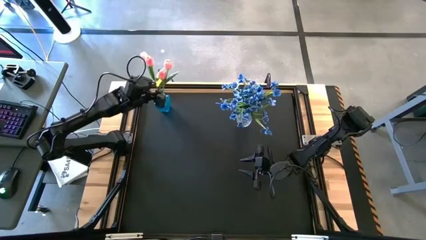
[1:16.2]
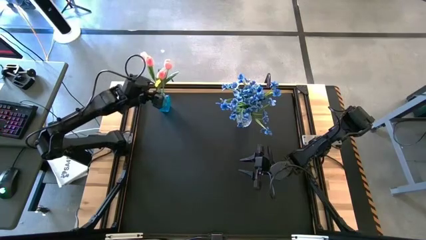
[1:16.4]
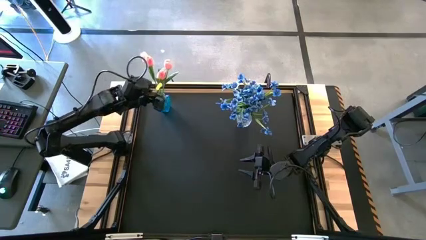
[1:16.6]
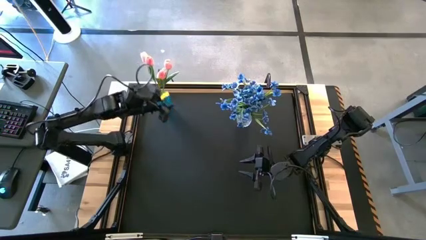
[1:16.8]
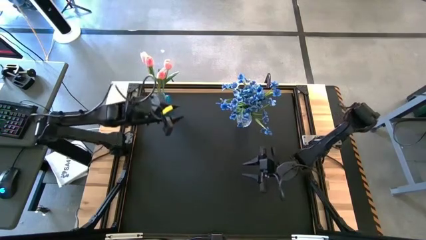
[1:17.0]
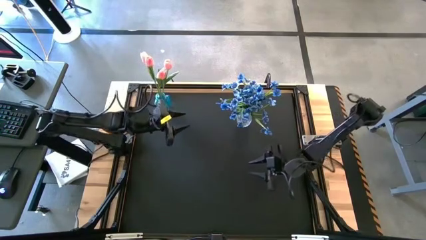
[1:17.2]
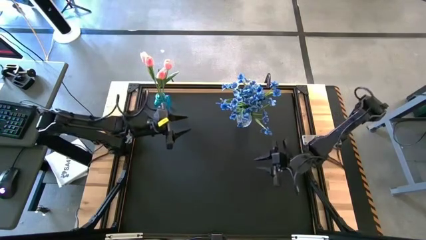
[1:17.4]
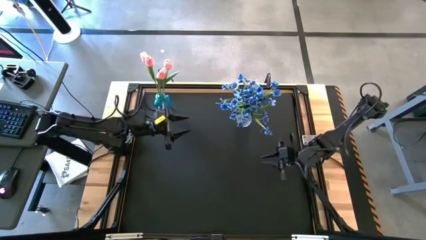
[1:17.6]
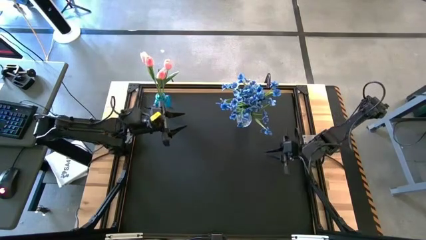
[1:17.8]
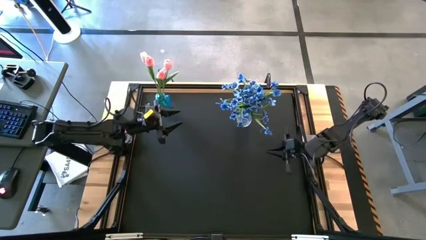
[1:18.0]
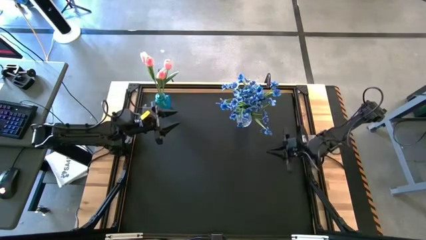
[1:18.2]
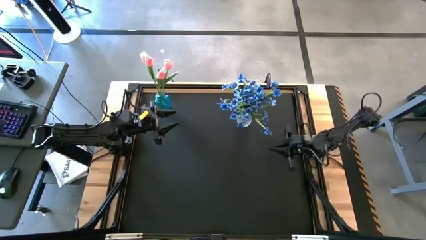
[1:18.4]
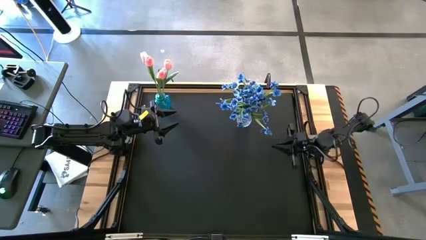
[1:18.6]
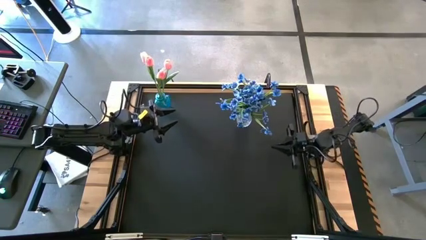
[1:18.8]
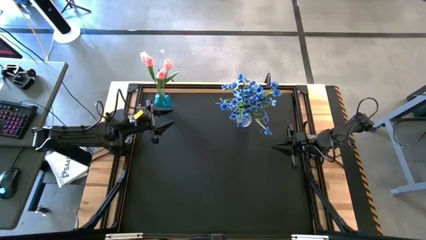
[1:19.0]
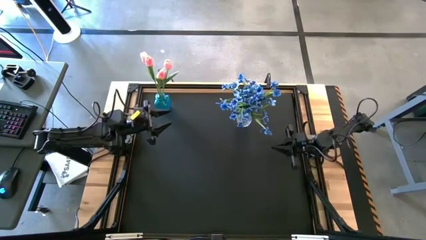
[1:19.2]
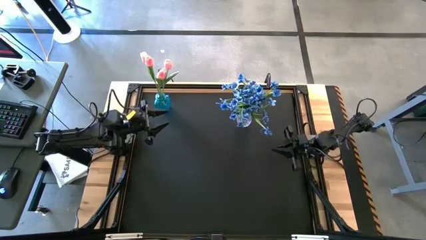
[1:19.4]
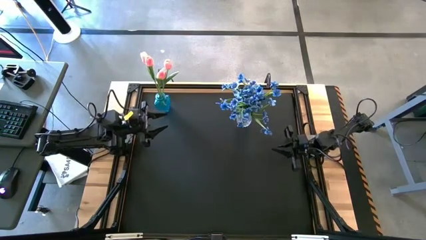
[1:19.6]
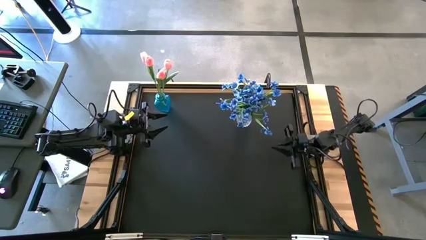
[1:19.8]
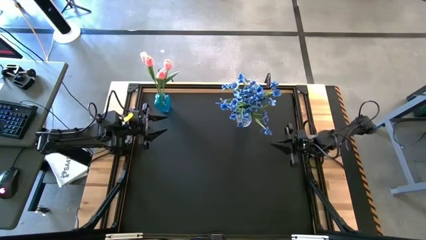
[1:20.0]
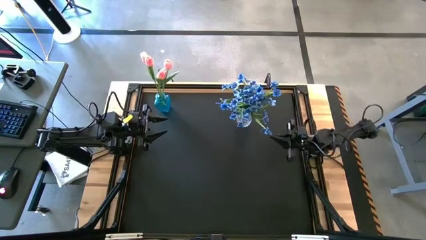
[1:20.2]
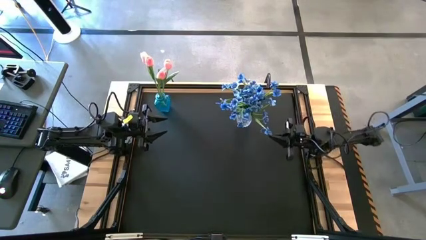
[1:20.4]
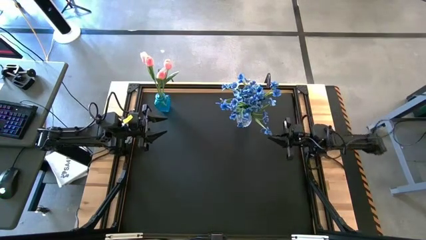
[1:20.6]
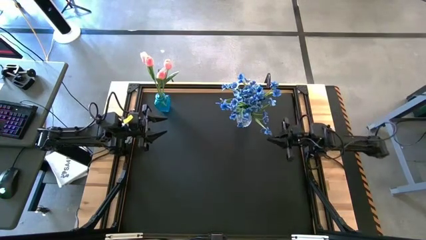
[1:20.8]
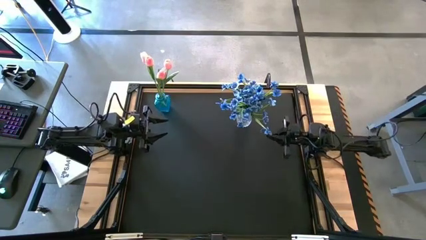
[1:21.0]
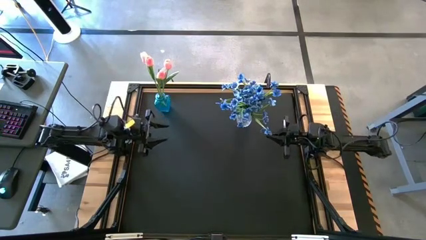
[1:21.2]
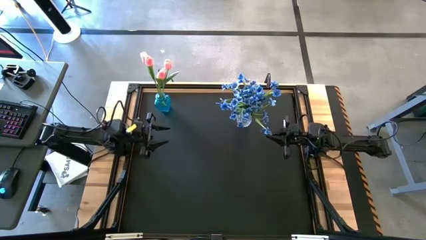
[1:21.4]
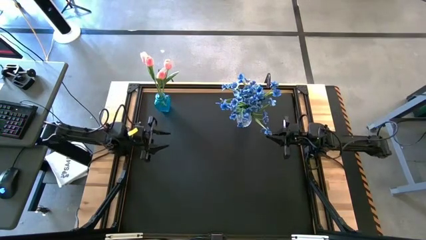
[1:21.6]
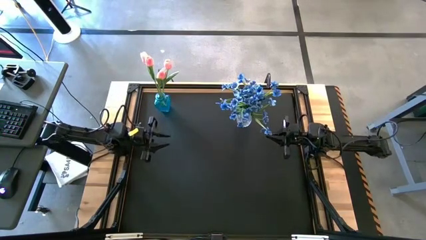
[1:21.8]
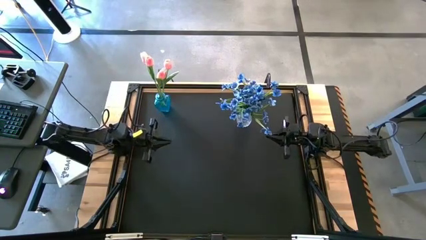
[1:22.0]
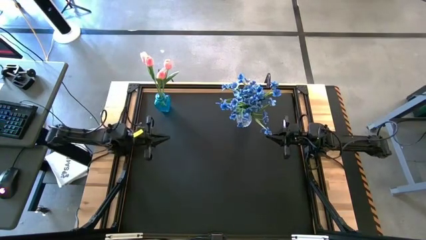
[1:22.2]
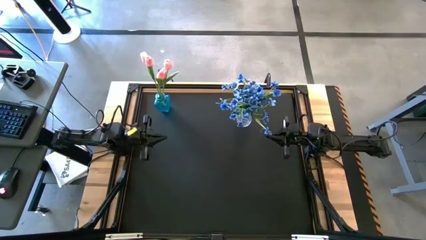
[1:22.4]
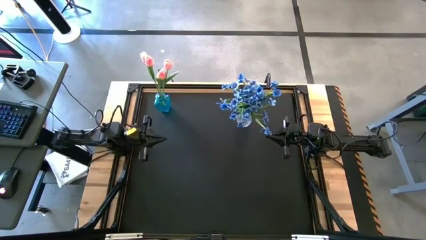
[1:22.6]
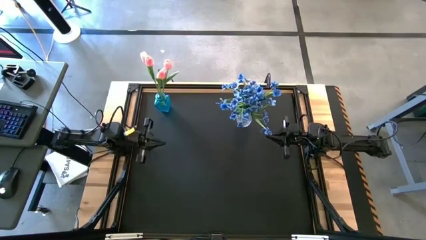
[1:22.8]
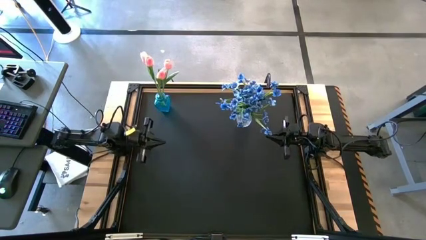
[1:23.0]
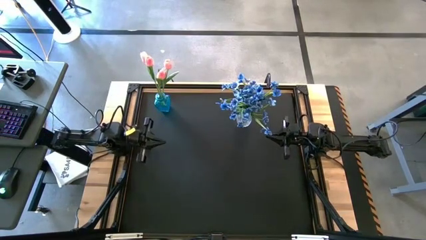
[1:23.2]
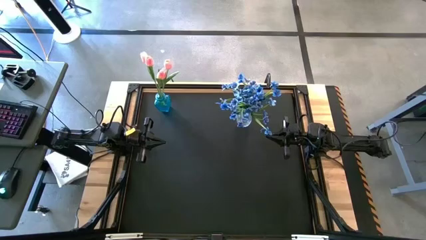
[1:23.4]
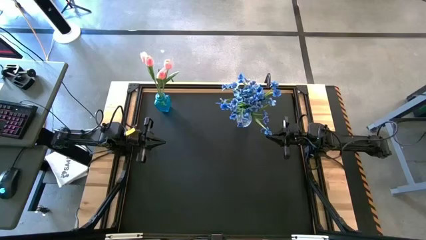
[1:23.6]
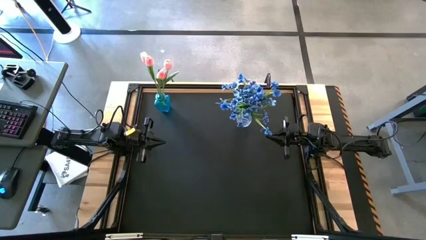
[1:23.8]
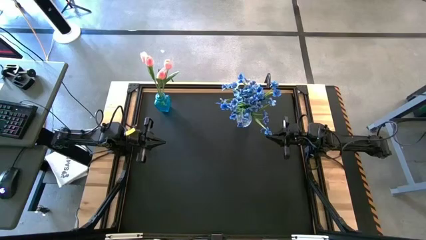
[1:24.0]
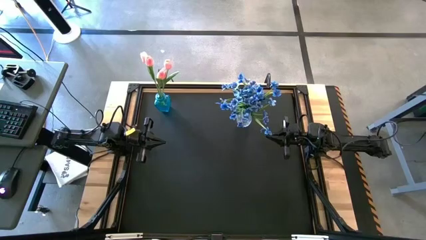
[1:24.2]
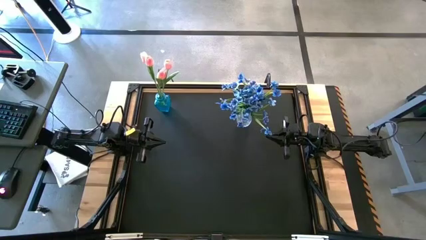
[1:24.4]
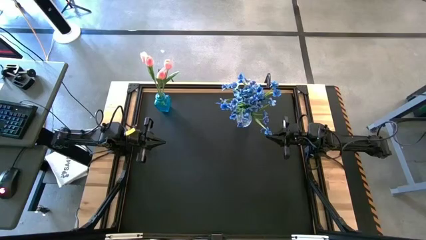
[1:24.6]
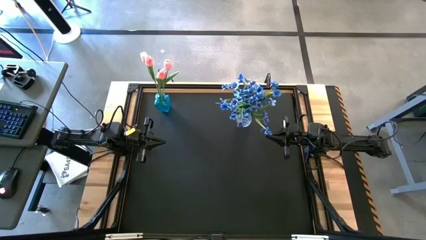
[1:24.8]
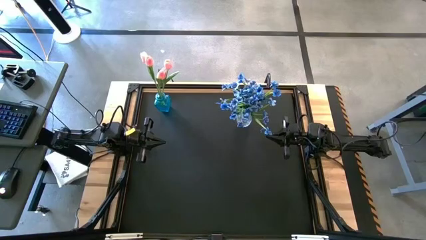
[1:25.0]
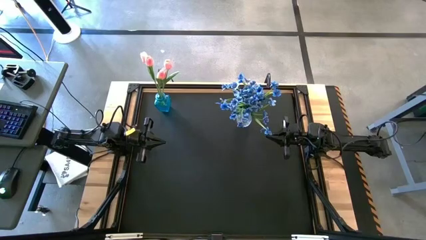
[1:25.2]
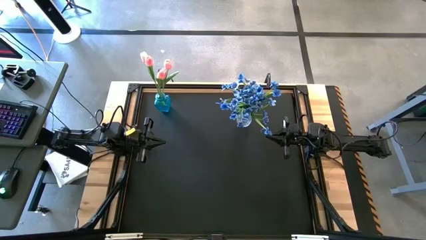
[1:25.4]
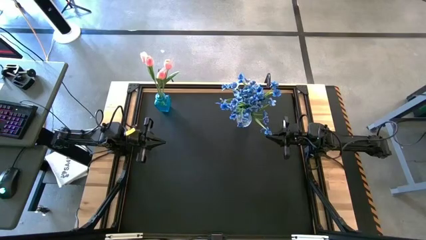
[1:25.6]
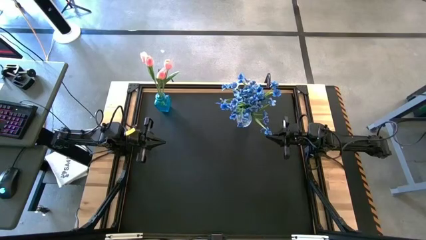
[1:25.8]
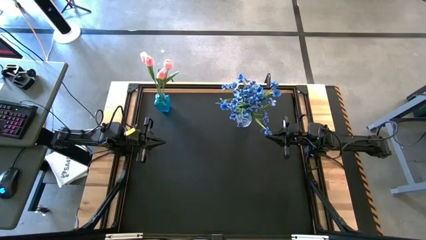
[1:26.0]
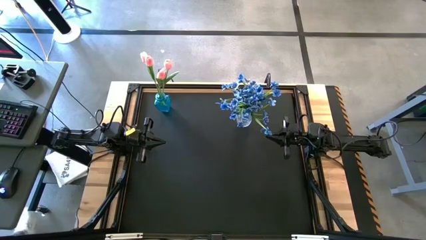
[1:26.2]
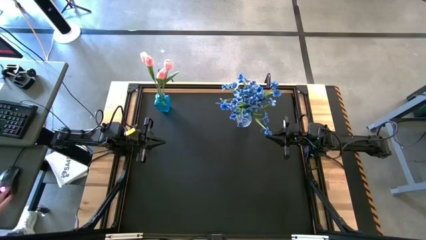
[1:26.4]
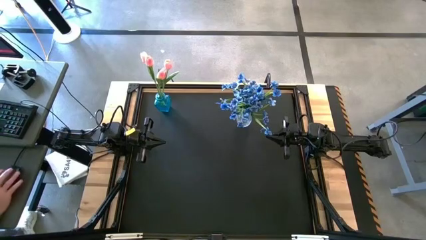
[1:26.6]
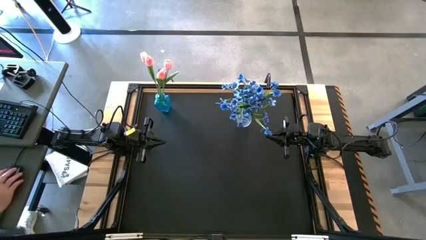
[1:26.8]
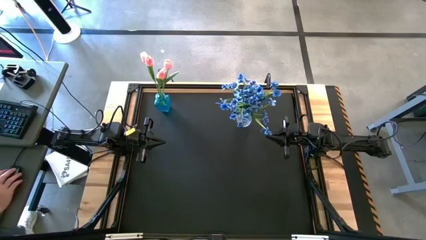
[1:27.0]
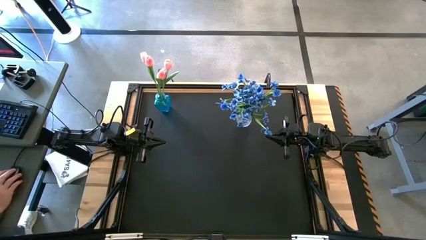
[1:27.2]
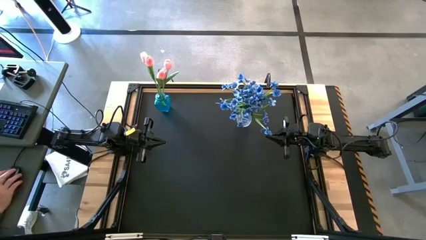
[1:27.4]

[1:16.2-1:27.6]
Task: Sort flowers into vase by color
Return to Home Position

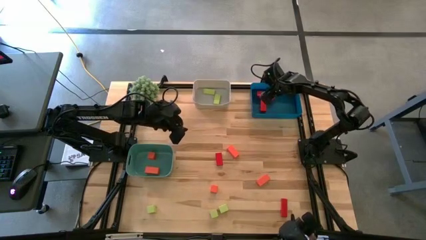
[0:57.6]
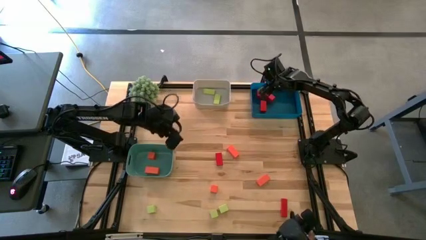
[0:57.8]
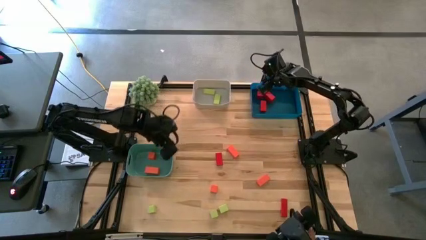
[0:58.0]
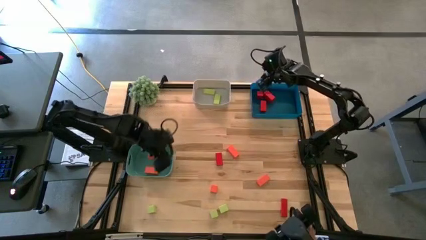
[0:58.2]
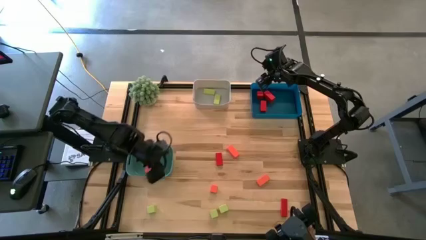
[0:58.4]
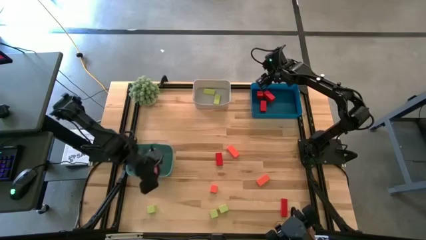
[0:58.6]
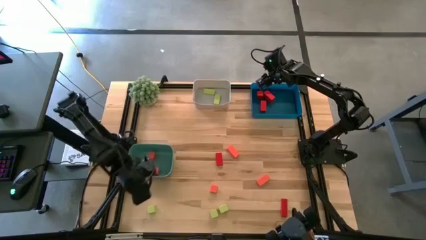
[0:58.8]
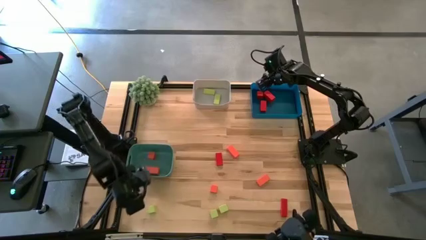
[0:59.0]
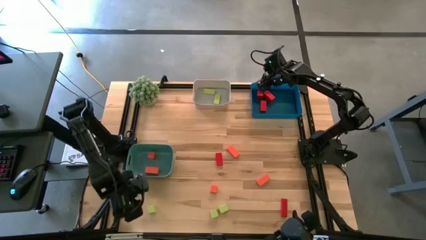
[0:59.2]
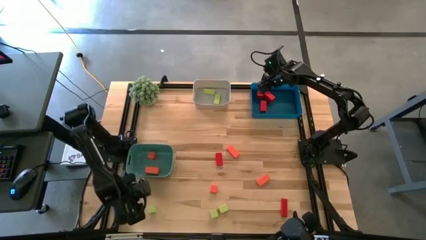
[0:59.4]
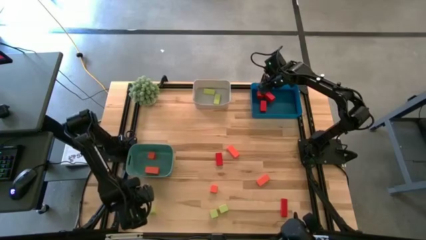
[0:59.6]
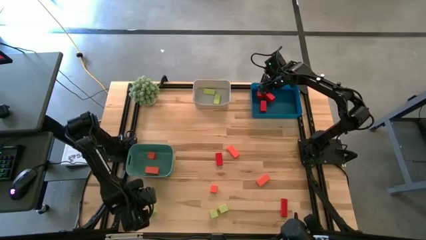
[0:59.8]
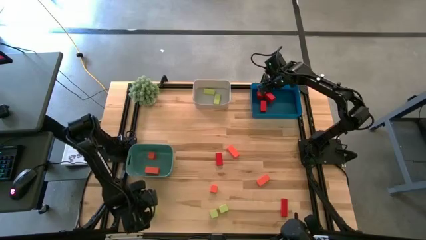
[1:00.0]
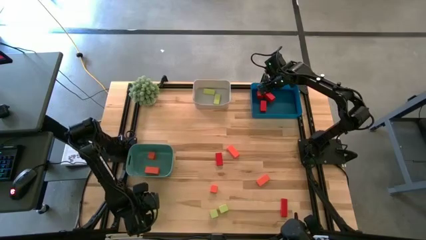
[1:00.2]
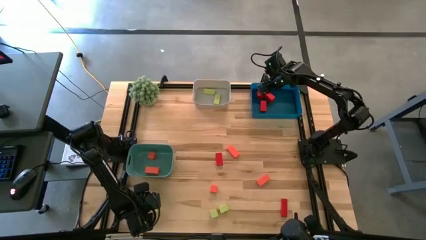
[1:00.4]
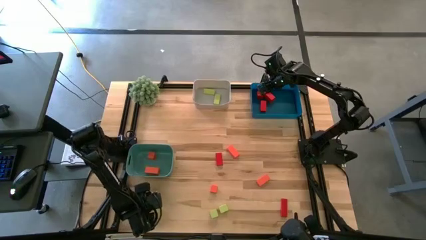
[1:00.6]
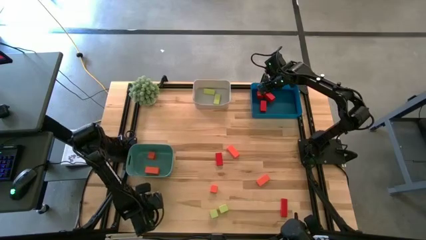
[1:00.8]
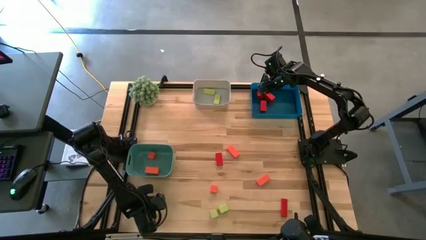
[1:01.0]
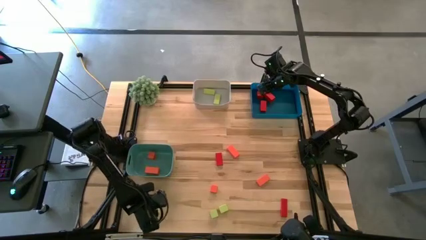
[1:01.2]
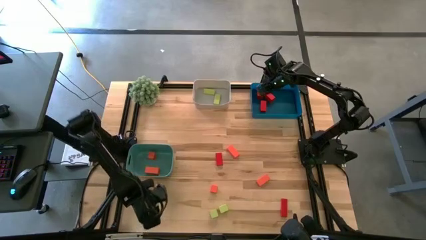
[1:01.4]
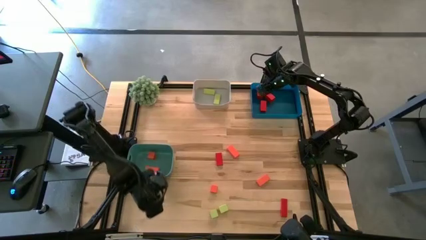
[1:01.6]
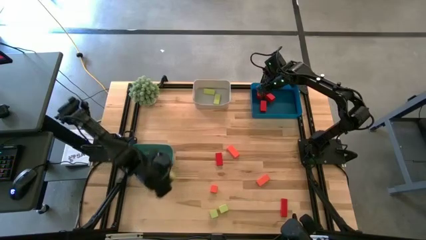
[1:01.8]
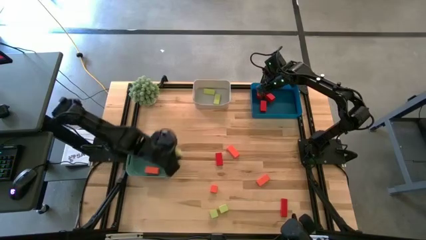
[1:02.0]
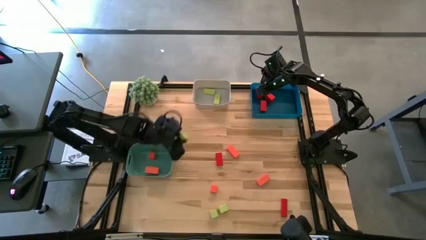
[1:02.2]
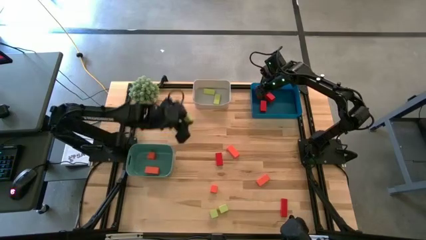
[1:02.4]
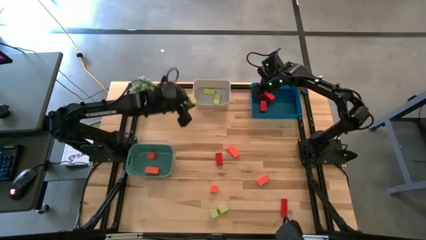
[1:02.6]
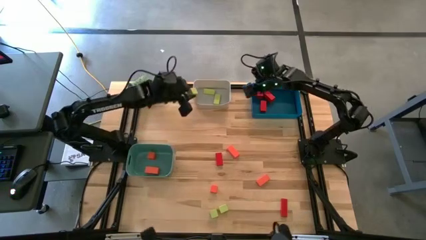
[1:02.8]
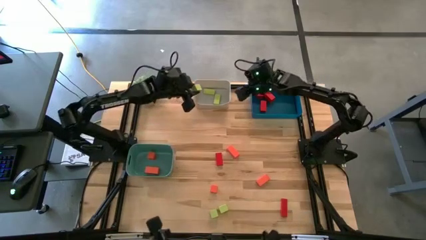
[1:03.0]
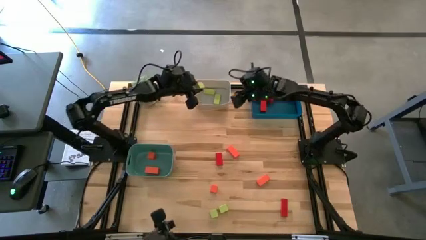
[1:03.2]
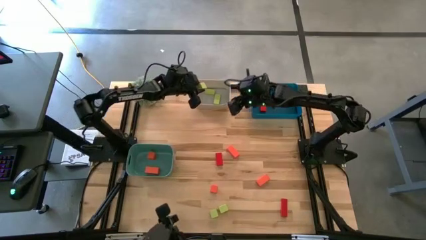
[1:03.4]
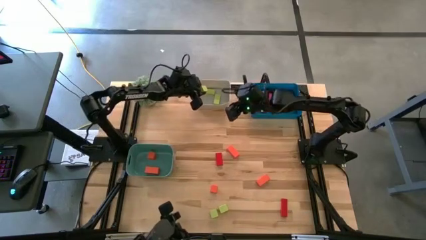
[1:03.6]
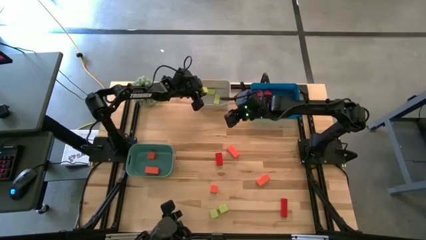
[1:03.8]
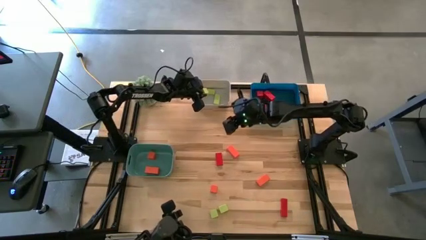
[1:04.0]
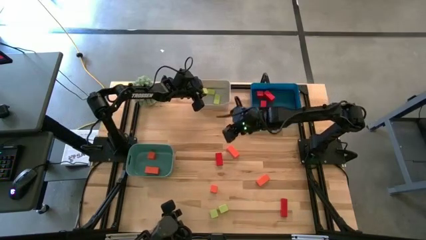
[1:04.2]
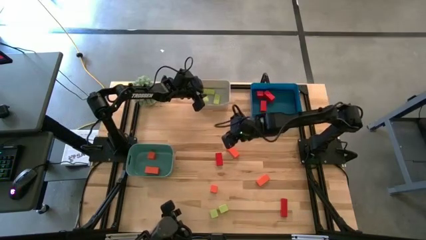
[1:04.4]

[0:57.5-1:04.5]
Task: Sort & place blocks by color
Put the green block into the gray bin
